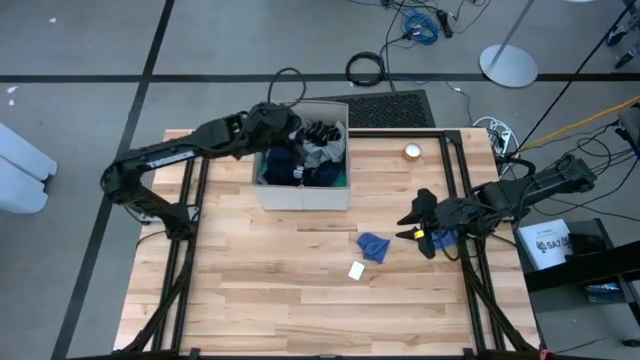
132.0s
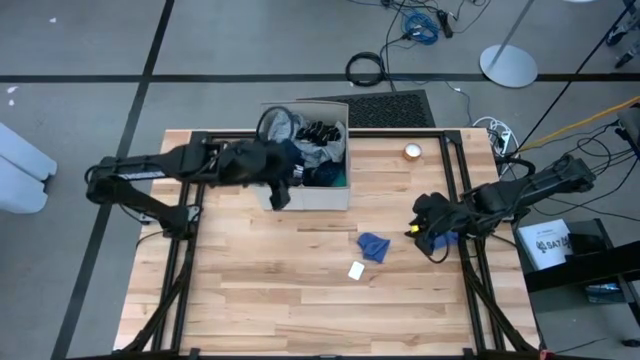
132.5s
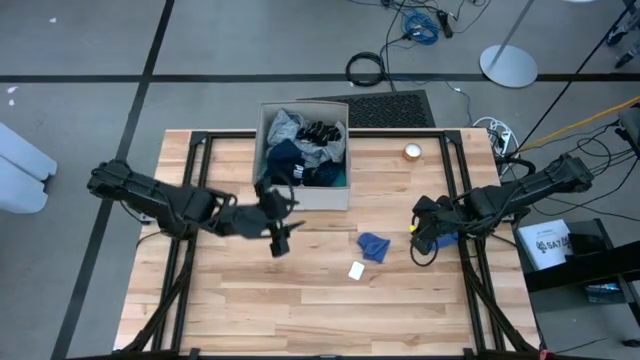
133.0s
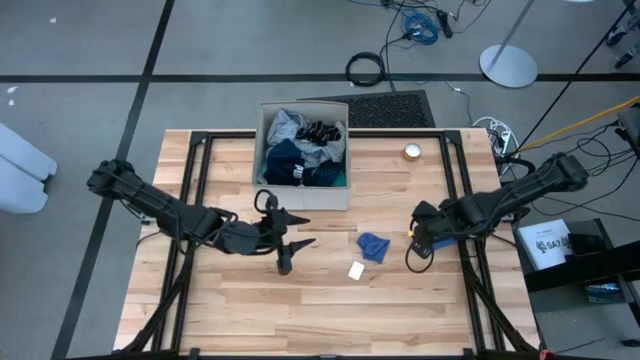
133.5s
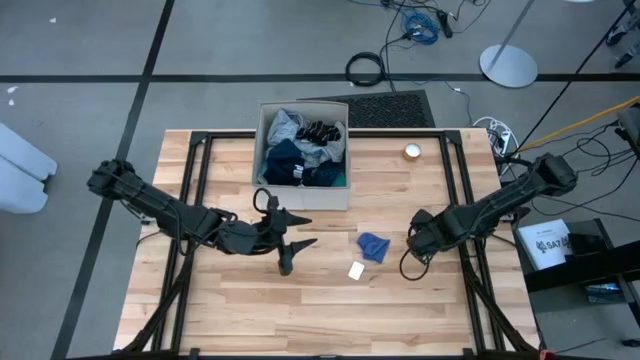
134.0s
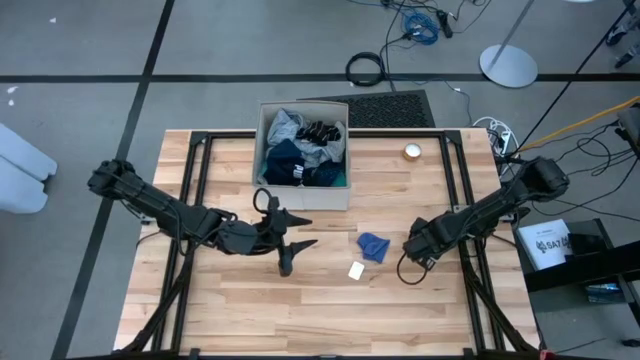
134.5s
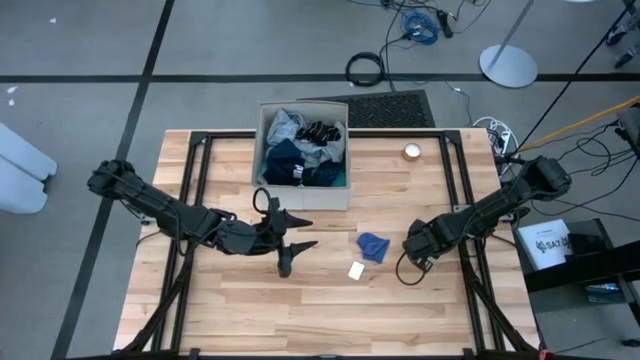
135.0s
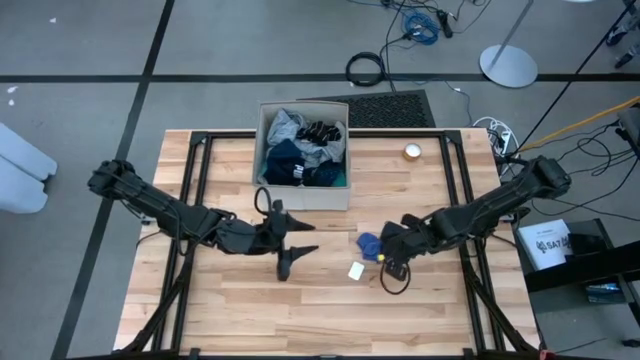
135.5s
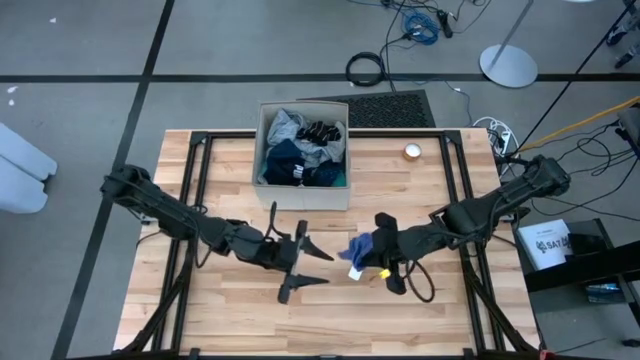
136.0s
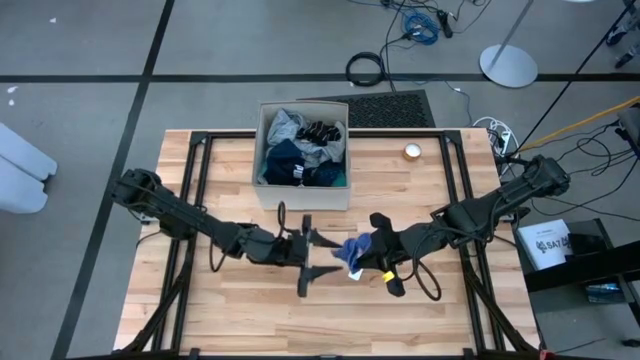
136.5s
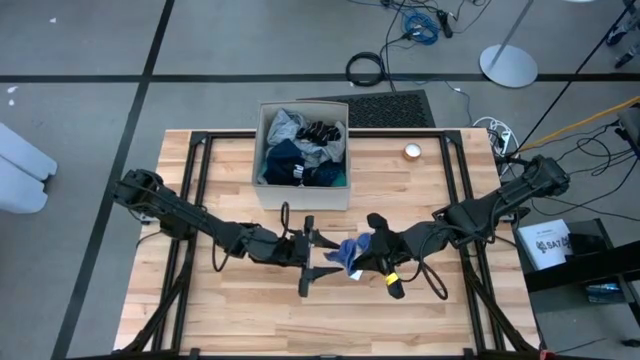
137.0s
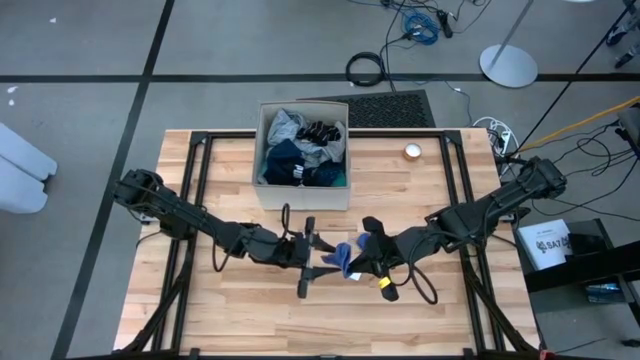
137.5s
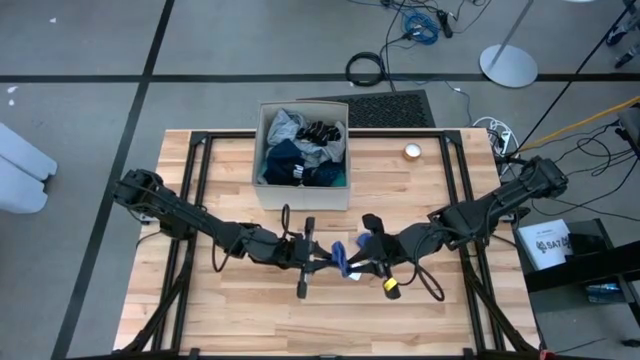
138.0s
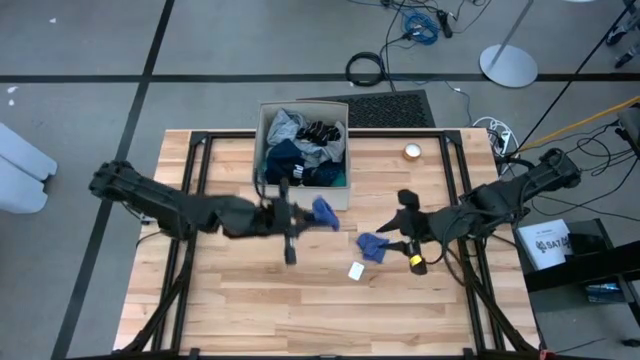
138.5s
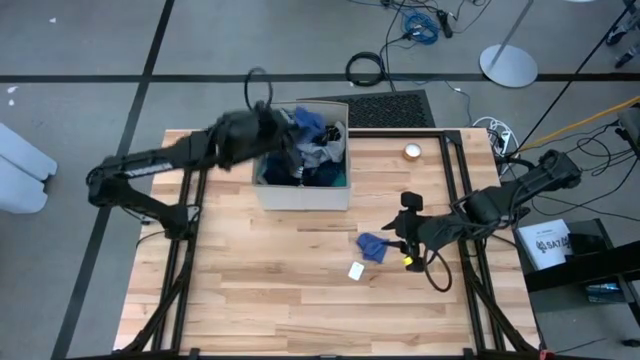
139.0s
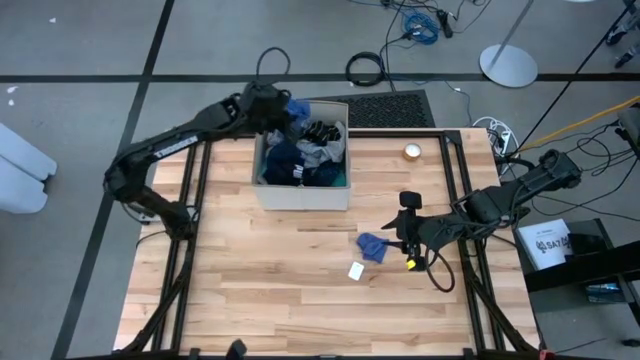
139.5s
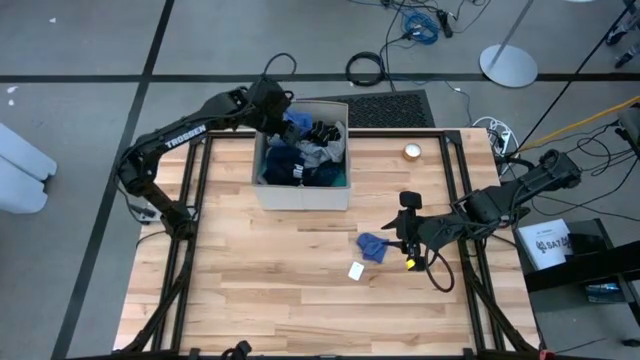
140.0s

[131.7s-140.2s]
Task: Sort clothes
Put the blue sock into the white laundry organizer

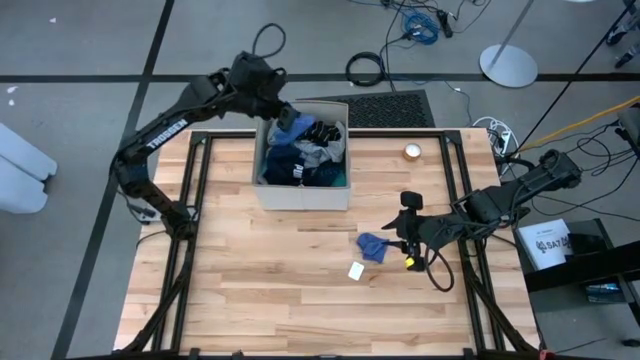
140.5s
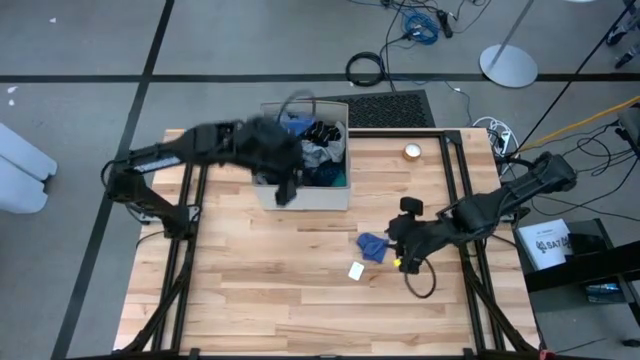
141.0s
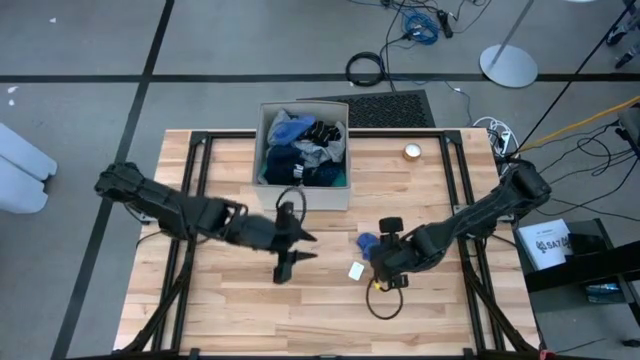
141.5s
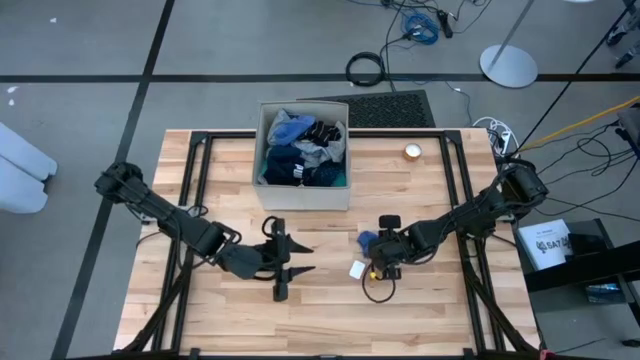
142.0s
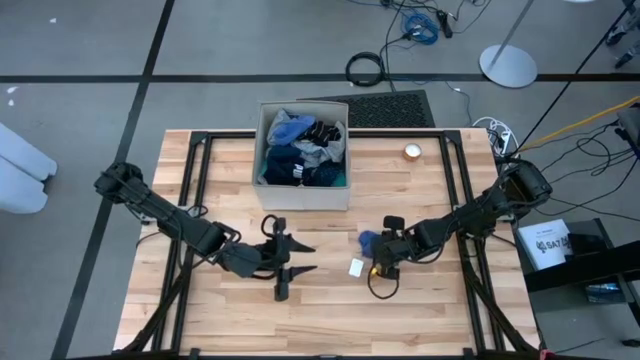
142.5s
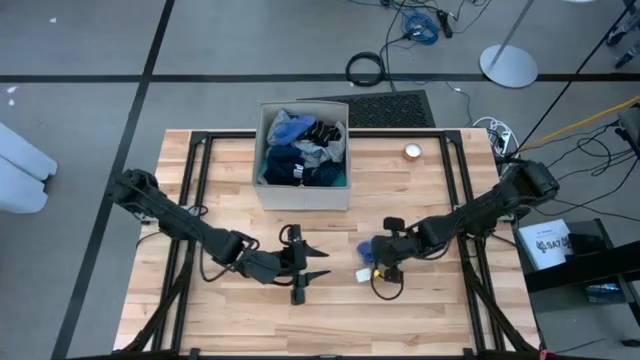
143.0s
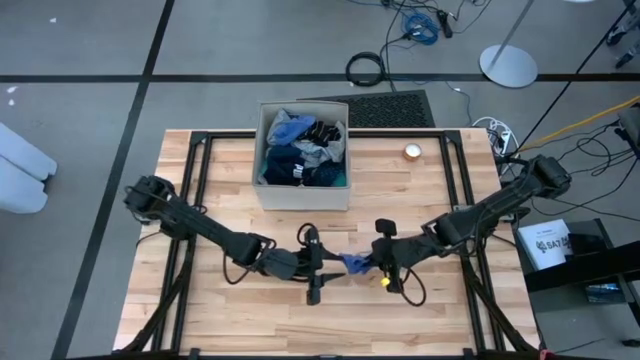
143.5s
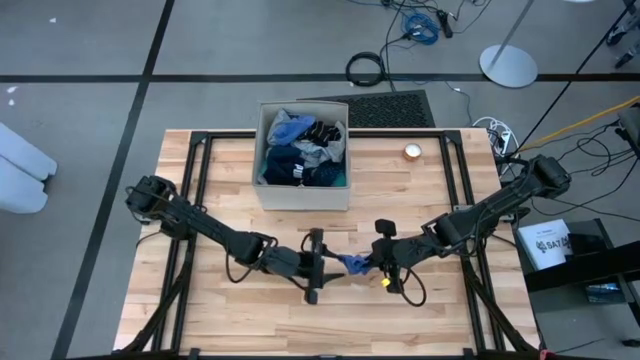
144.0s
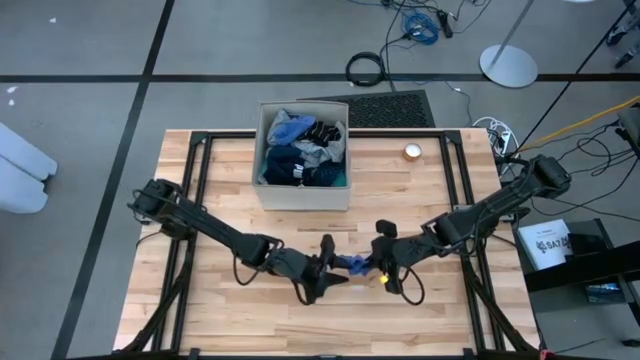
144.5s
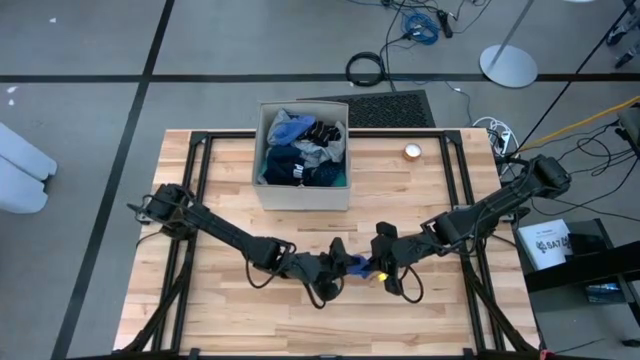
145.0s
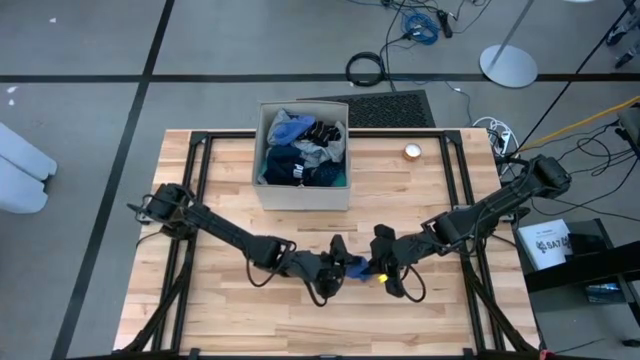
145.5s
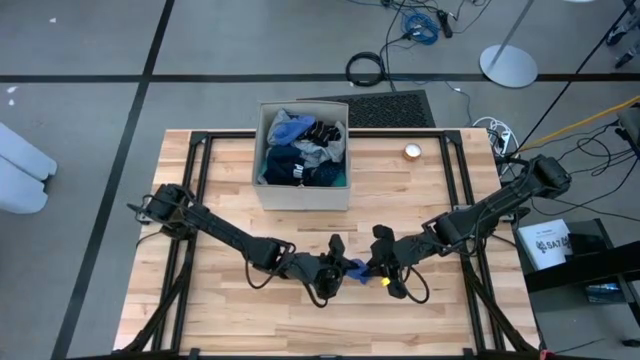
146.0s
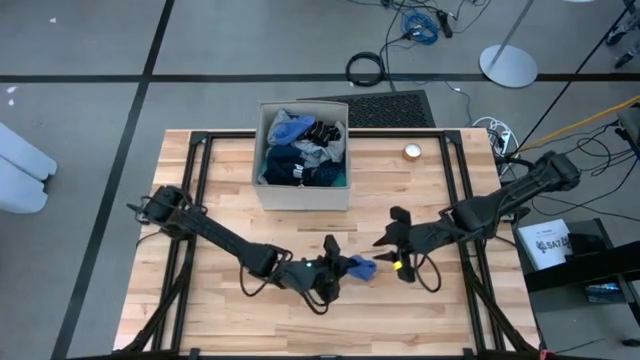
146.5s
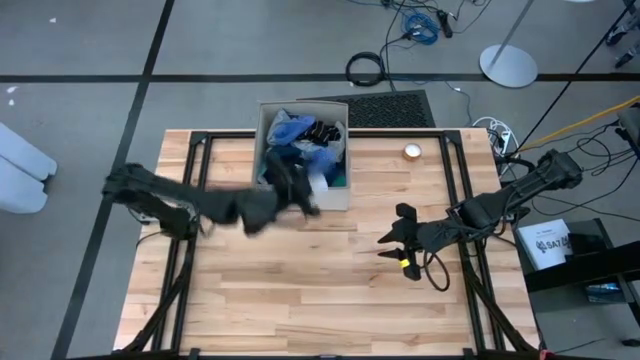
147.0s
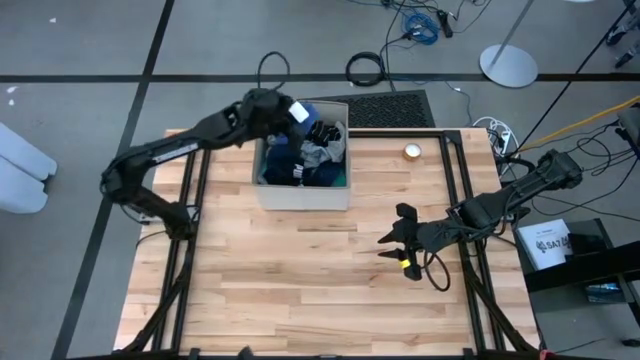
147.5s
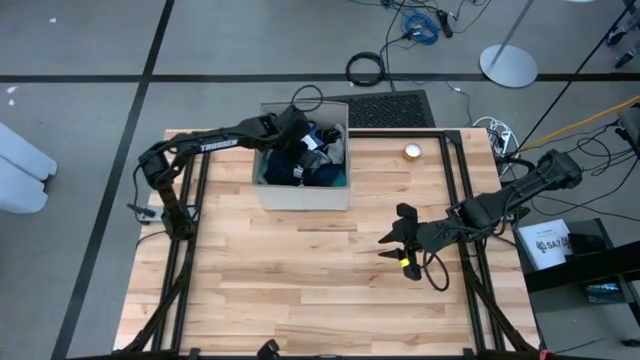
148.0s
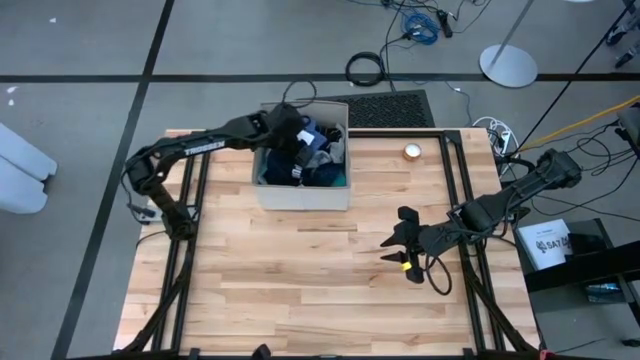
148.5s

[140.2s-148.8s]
Put the blue sock into the white laundry organizer

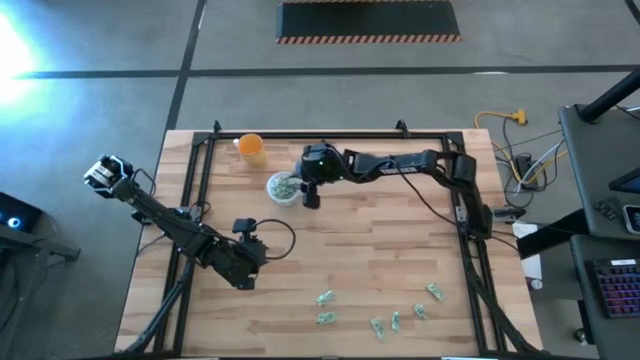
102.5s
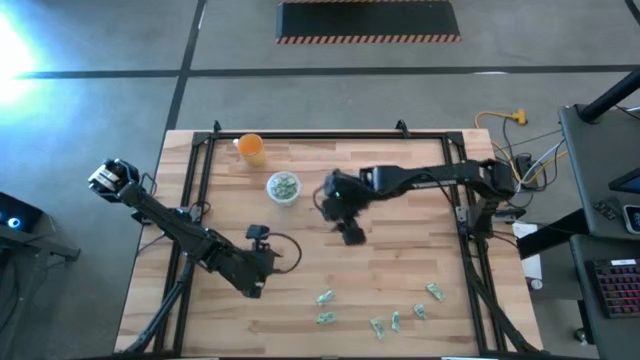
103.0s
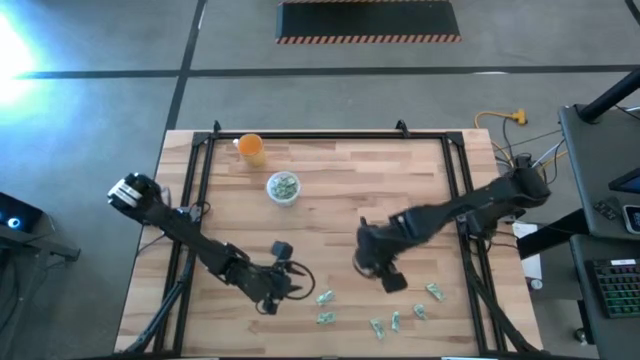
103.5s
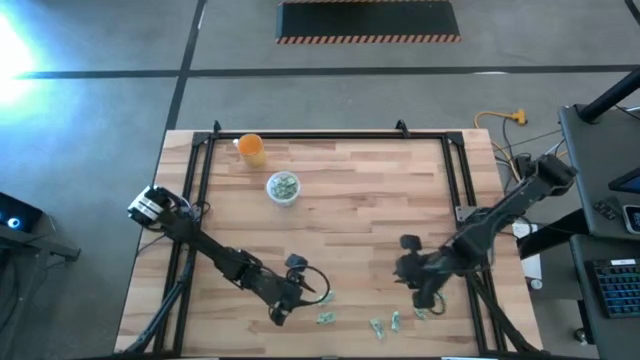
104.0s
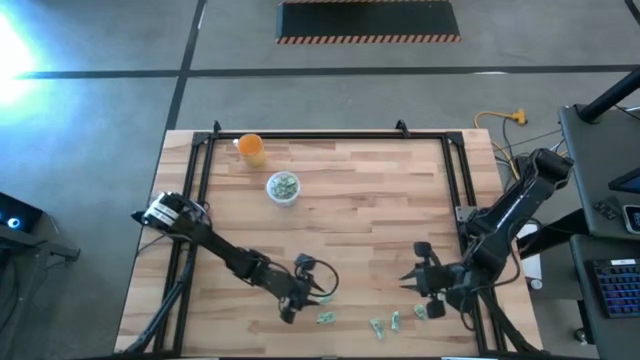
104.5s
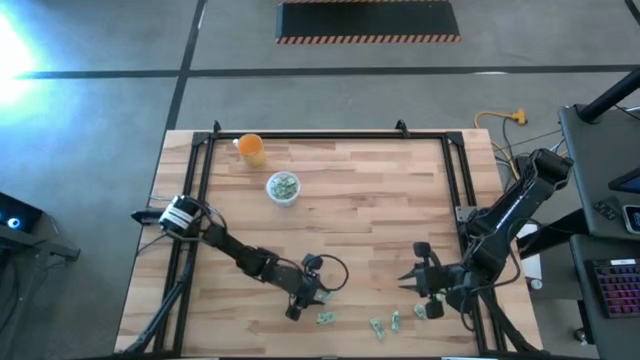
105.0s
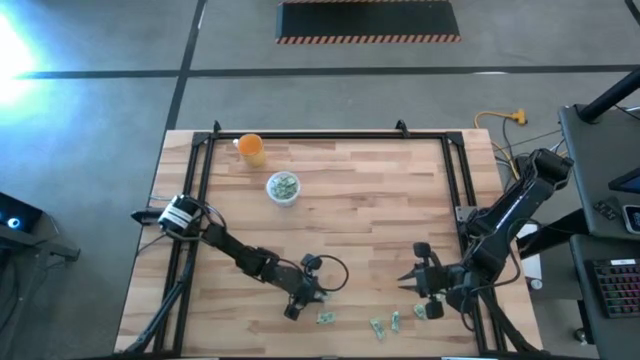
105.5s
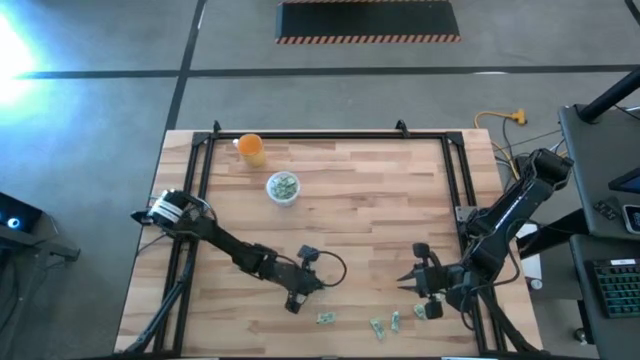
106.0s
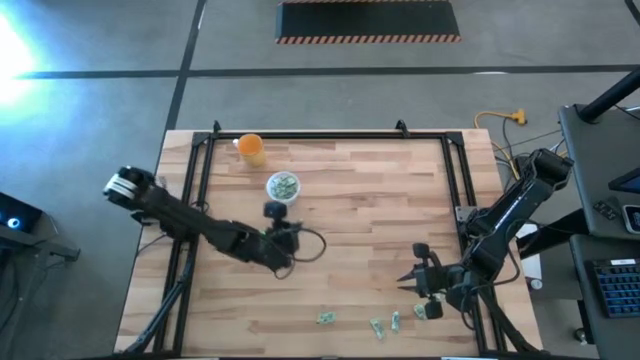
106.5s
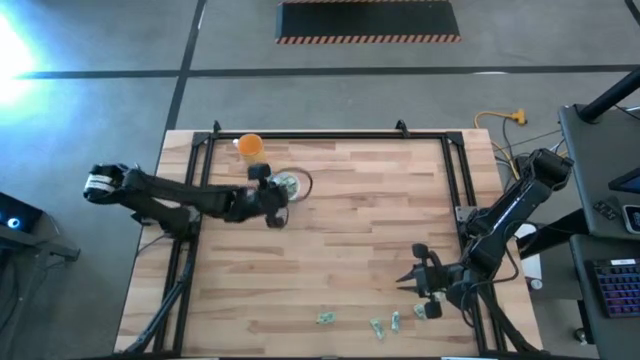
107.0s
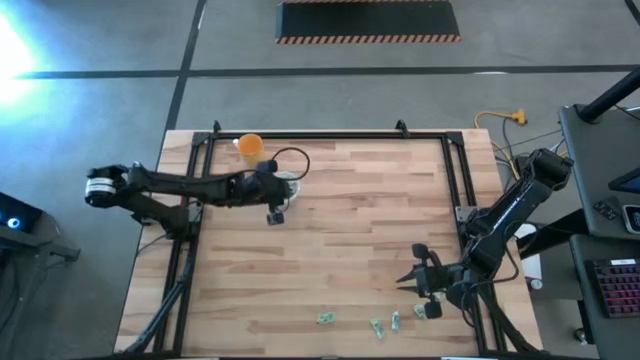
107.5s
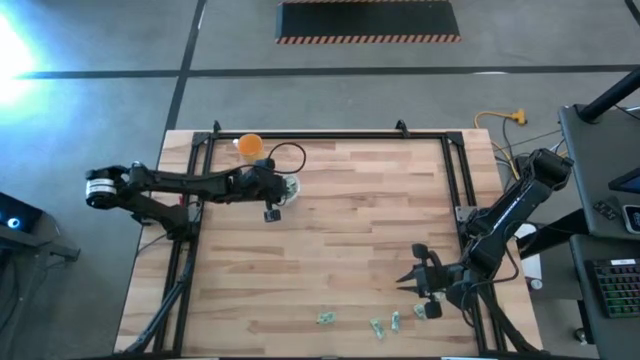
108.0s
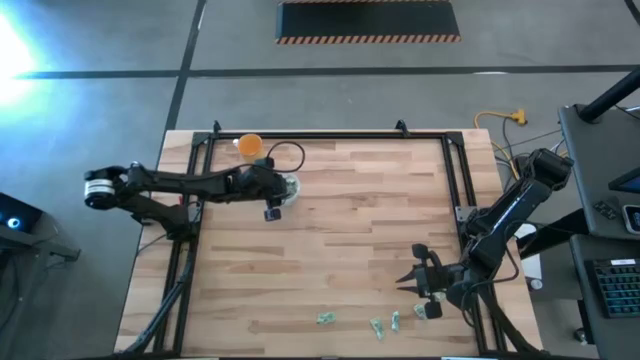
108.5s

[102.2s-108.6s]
Task: Pick and place Stevia / Truvia into bins
Put the stevia packet into the transparent container
